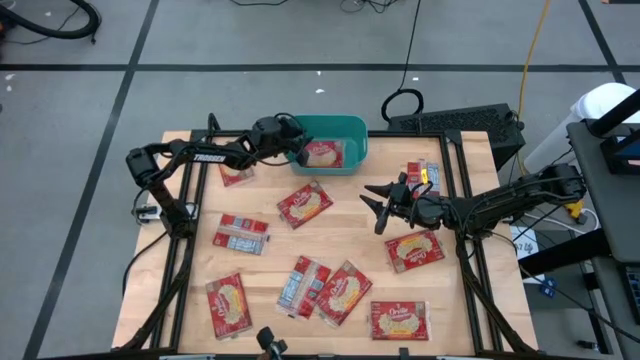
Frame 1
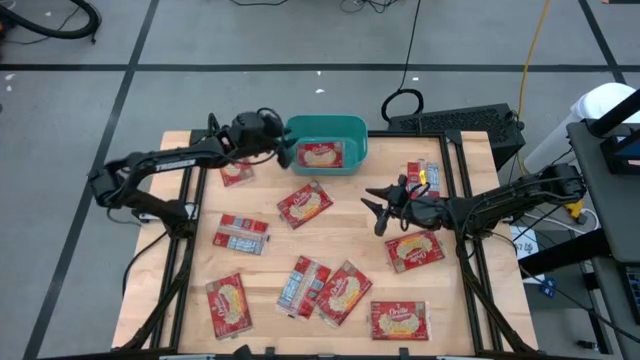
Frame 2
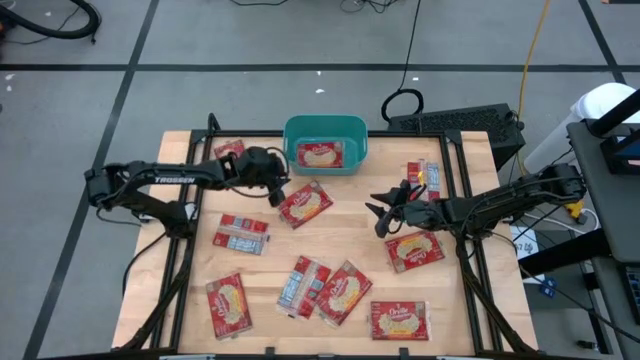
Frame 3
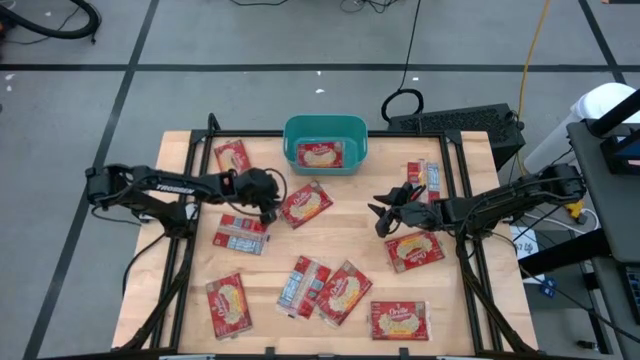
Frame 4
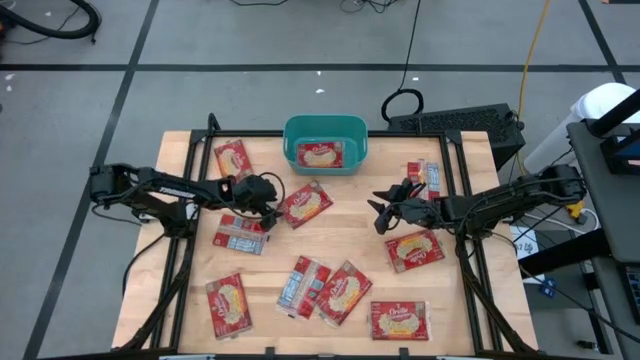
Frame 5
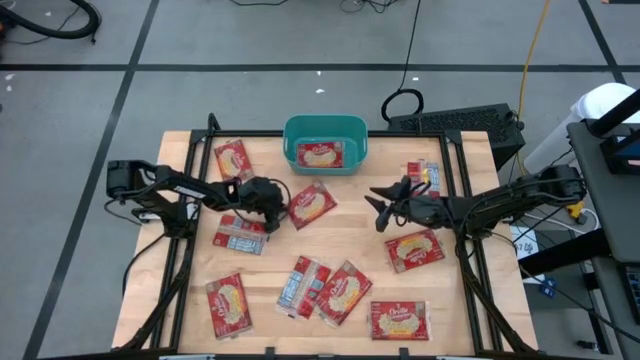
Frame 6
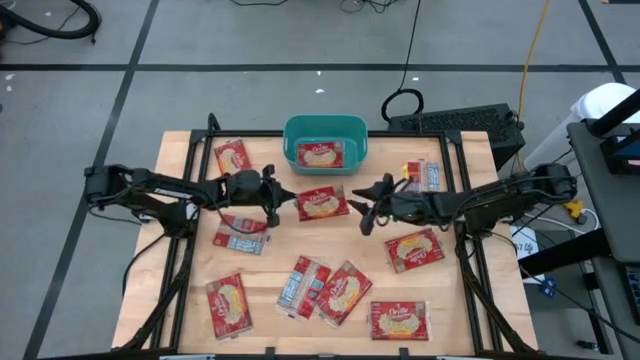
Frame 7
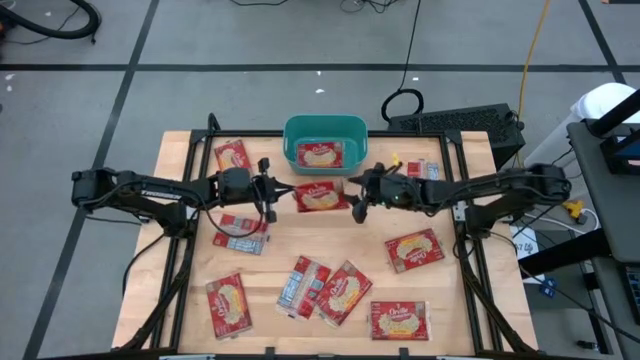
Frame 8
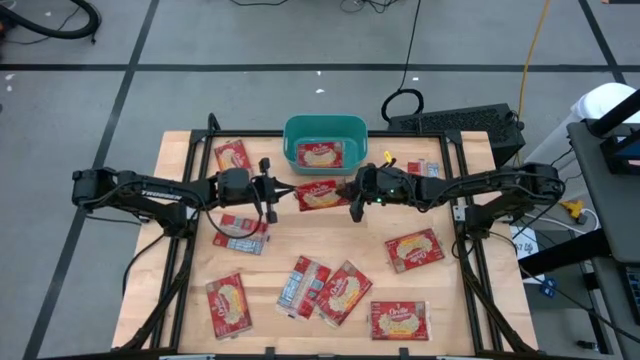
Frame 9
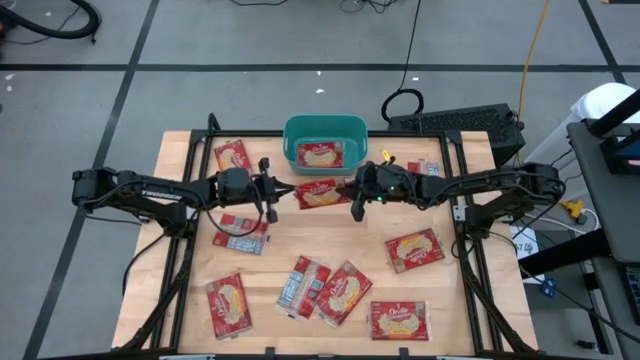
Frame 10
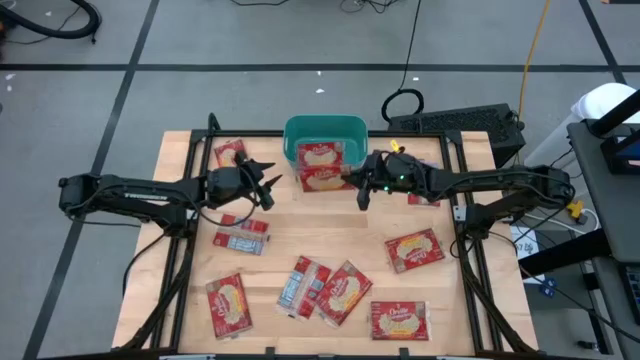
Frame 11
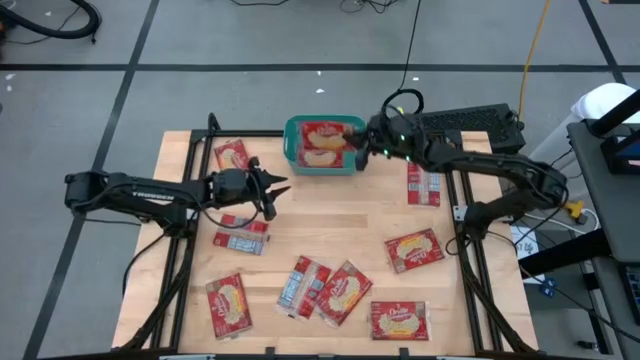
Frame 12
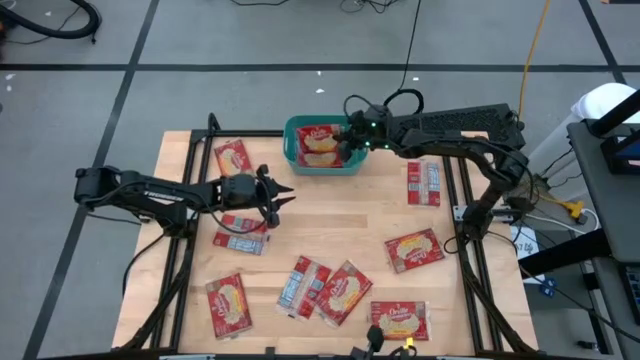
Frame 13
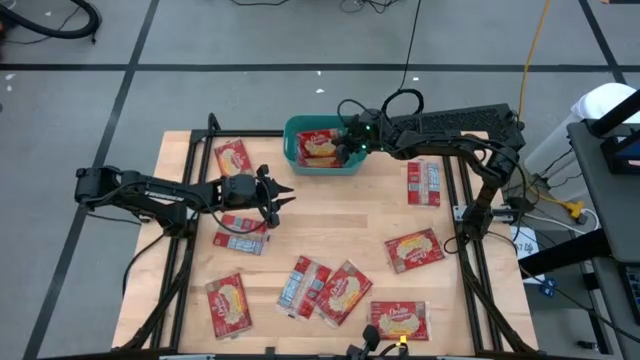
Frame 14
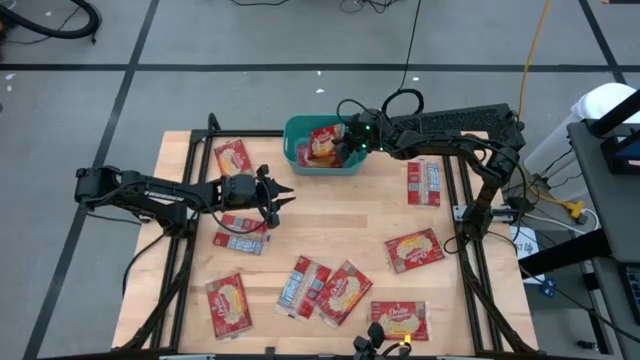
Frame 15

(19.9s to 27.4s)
Task: Sort popcorn bags into baskets
Put the red popcorn bag into the green bin

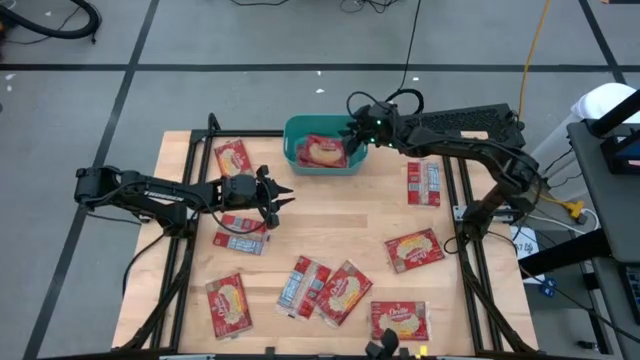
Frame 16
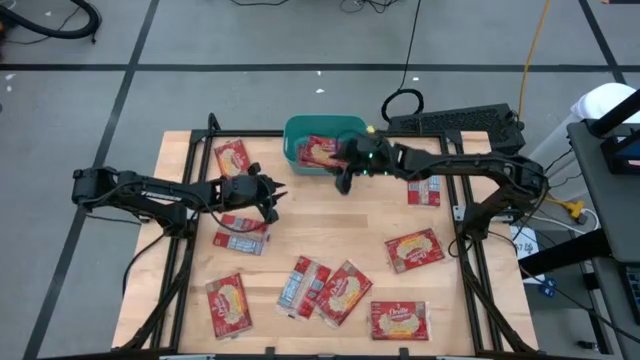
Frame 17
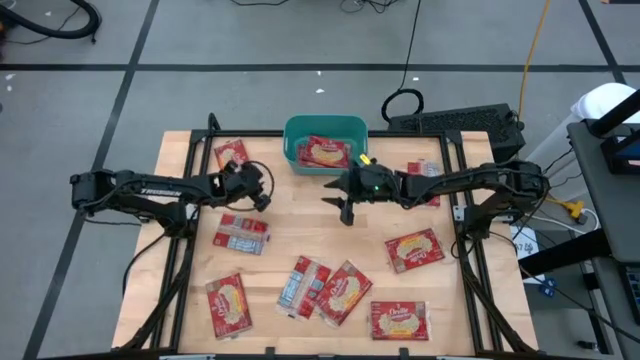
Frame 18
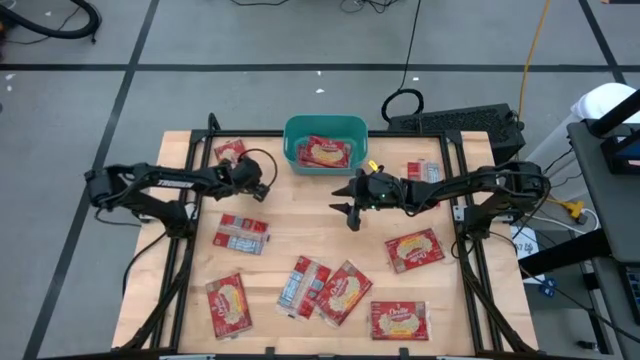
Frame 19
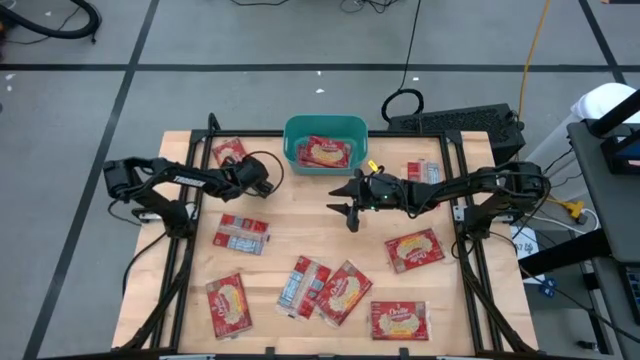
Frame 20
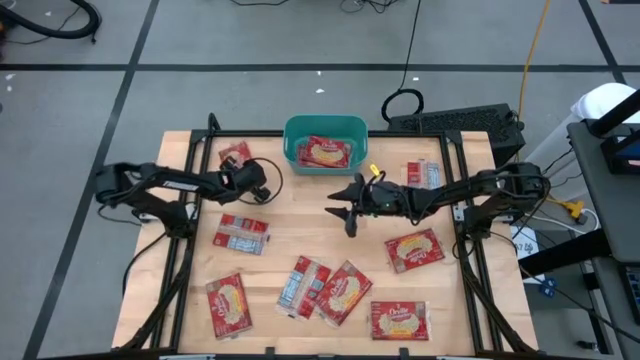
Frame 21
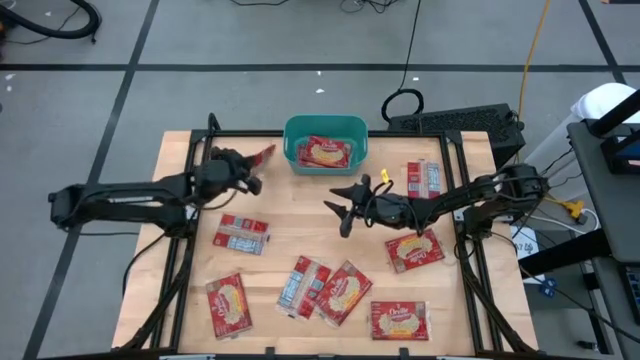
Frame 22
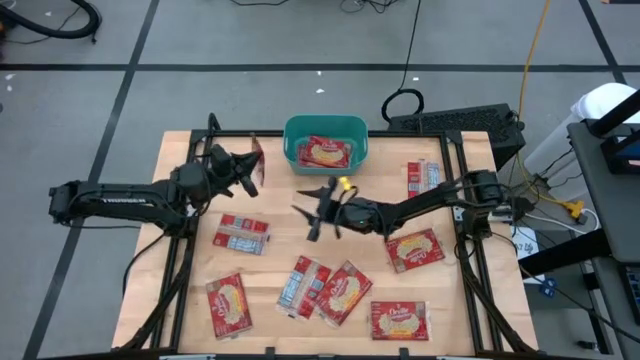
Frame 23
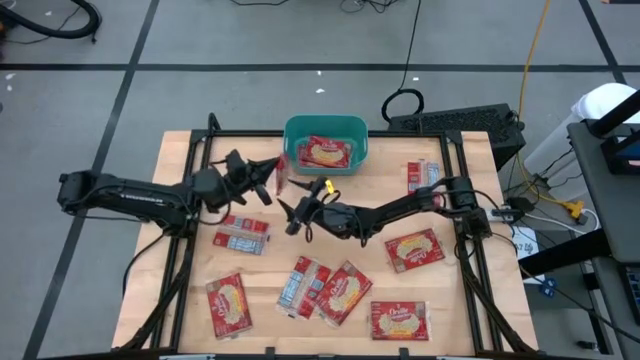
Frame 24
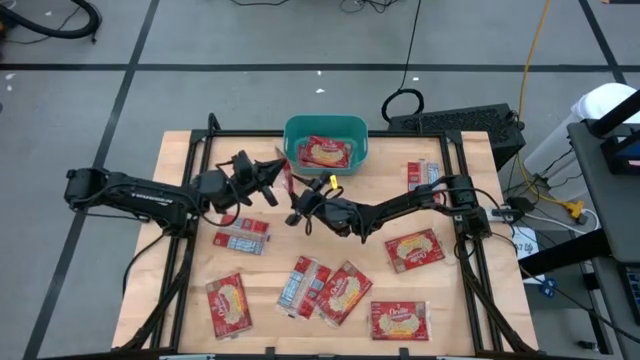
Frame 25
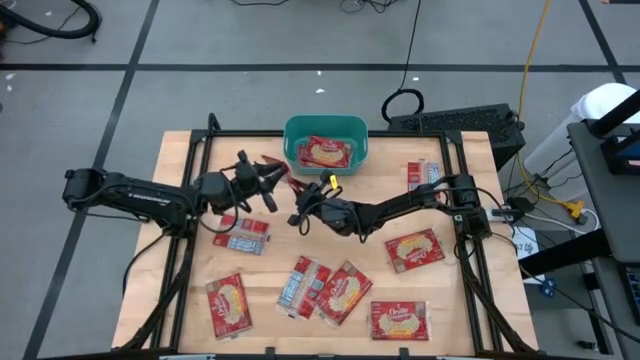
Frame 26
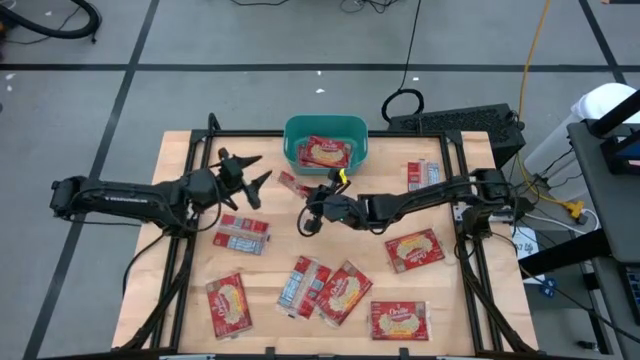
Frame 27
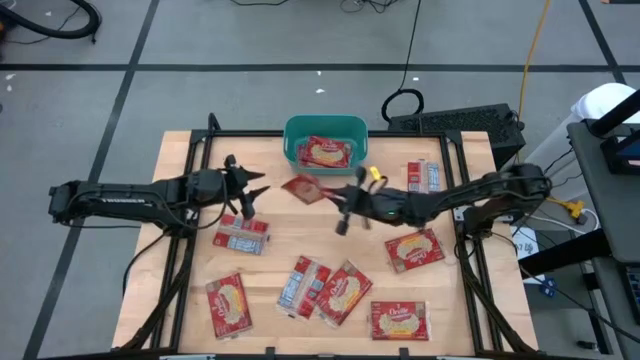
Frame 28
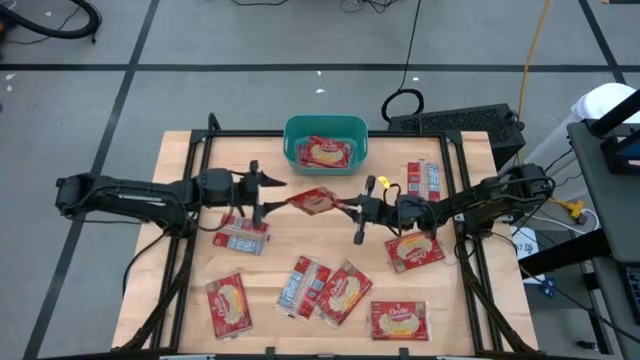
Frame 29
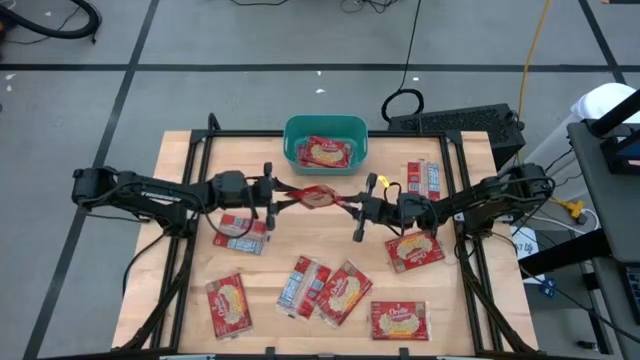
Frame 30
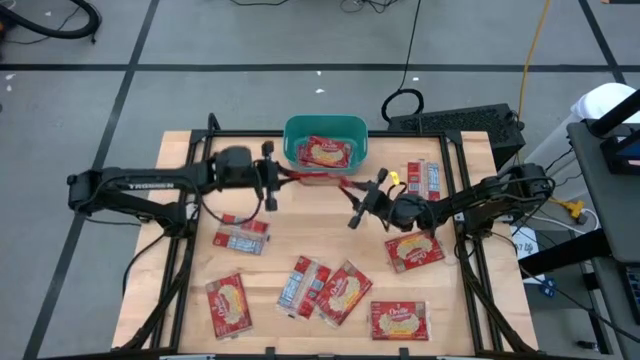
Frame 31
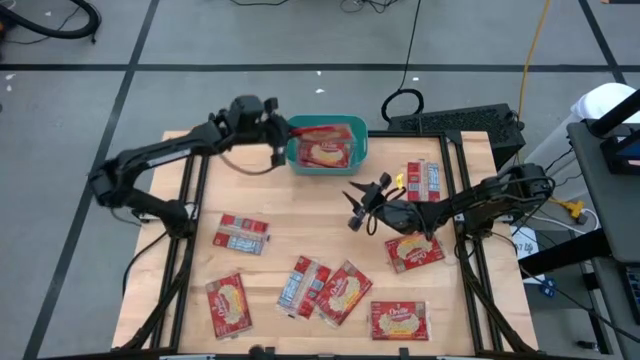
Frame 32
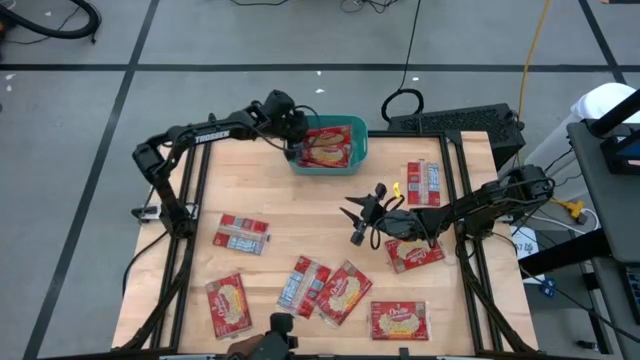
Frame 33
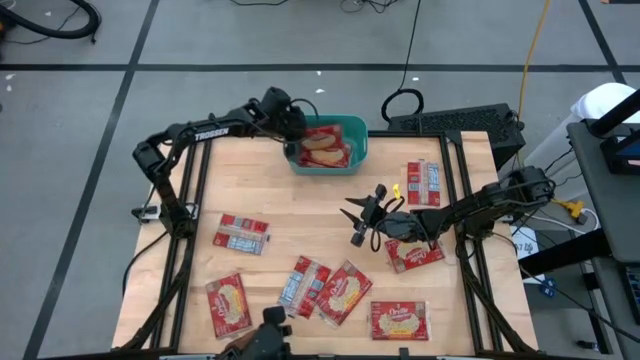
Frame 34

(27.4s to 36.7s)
Put the red popcorn bag into the green bin

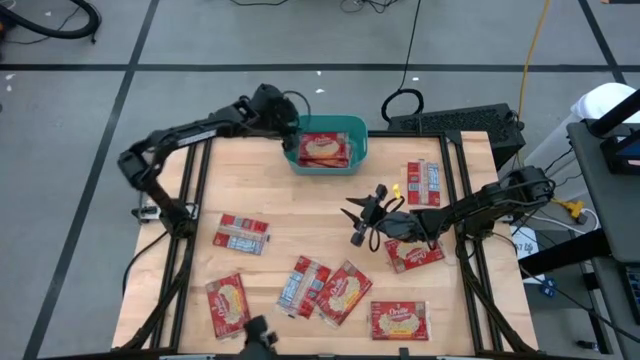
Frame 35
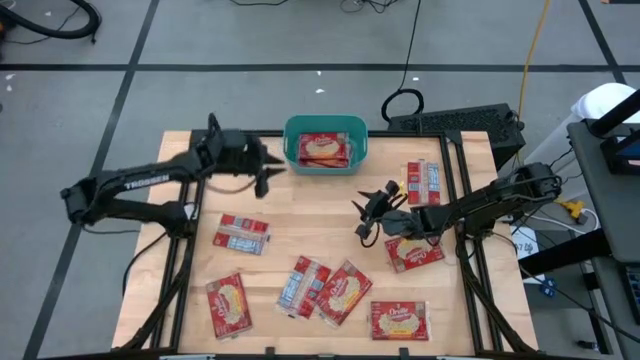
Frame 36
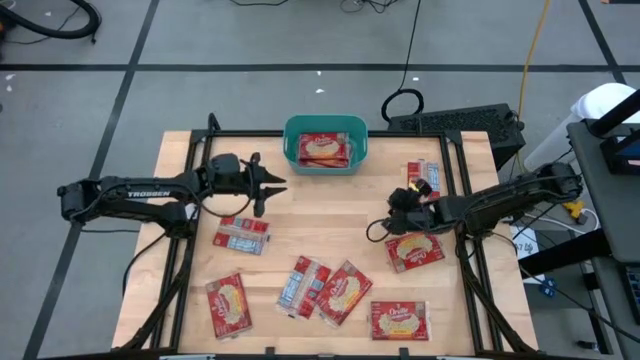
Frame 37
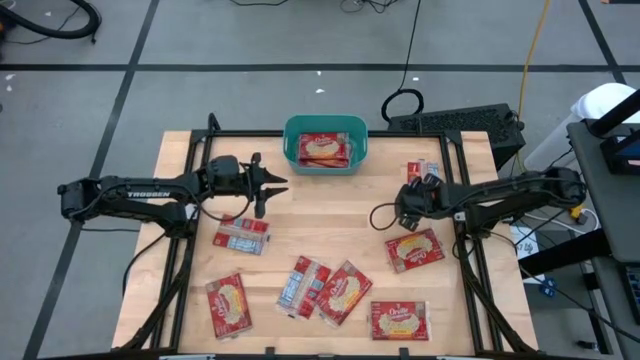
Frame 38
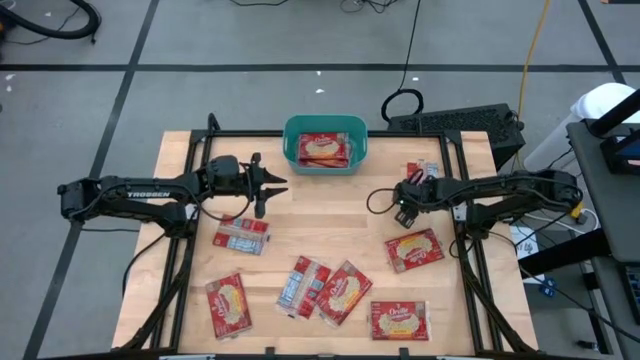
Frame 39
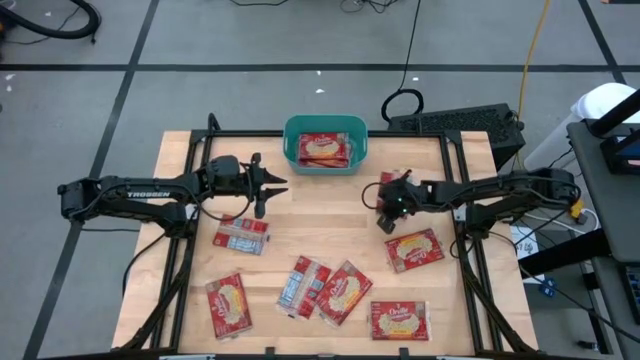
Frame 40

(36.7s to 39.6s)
Put the red popcorn bag into the green bin
